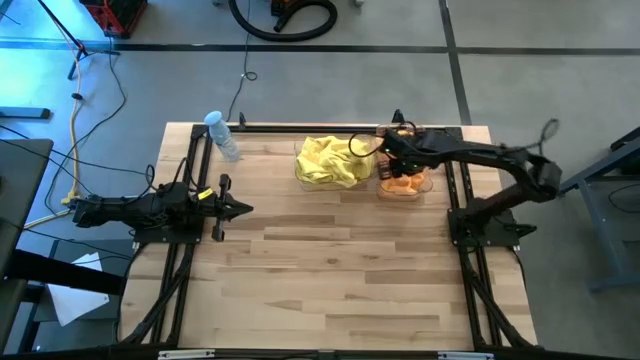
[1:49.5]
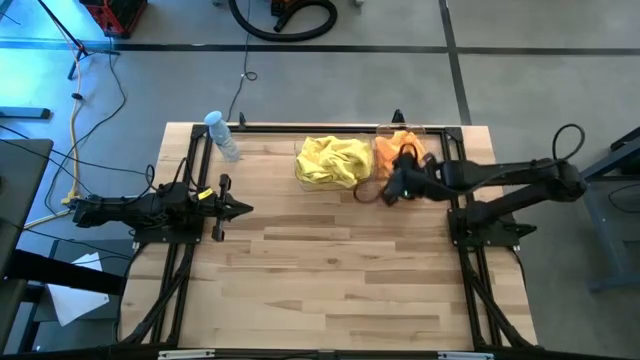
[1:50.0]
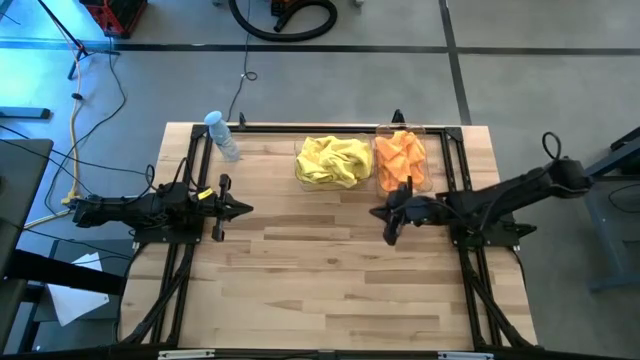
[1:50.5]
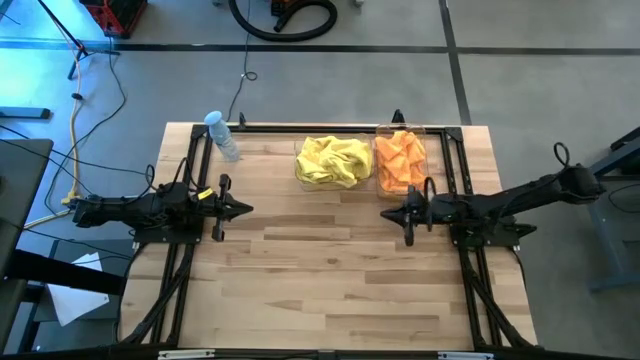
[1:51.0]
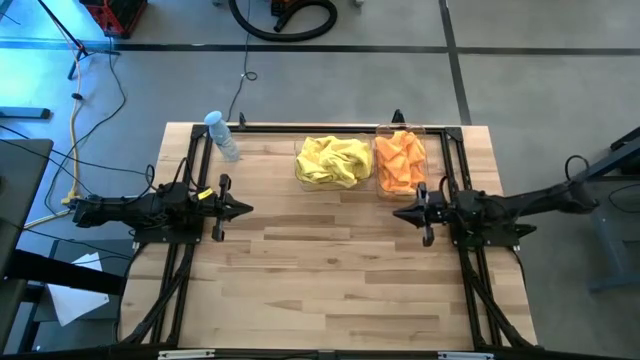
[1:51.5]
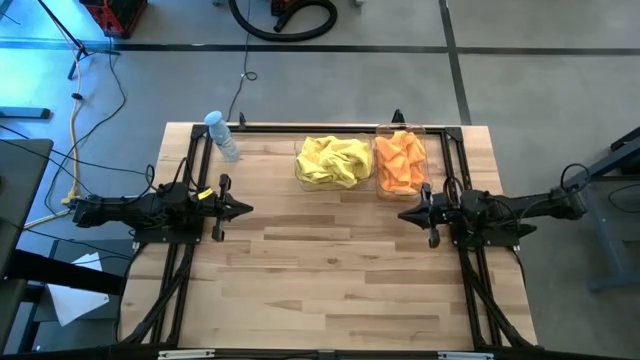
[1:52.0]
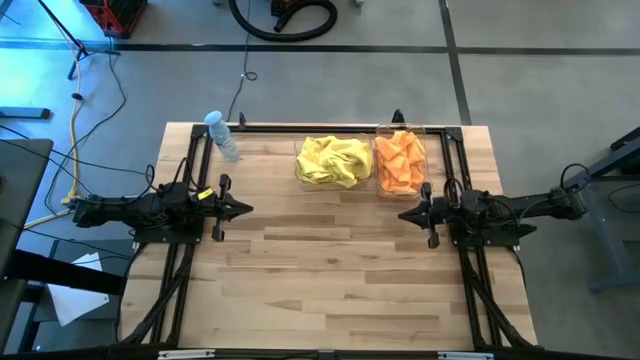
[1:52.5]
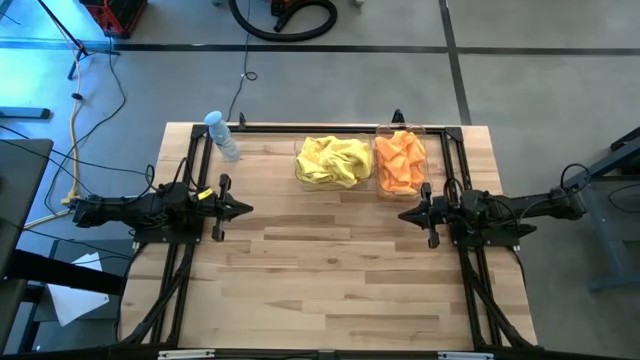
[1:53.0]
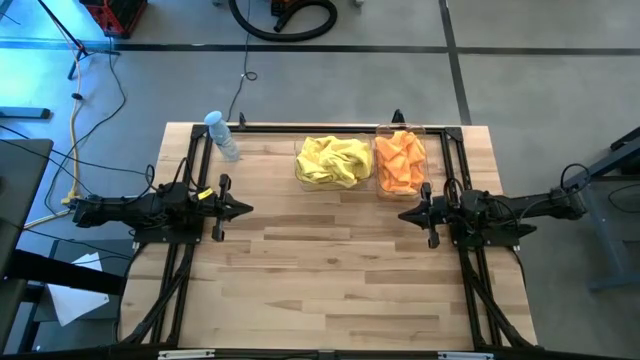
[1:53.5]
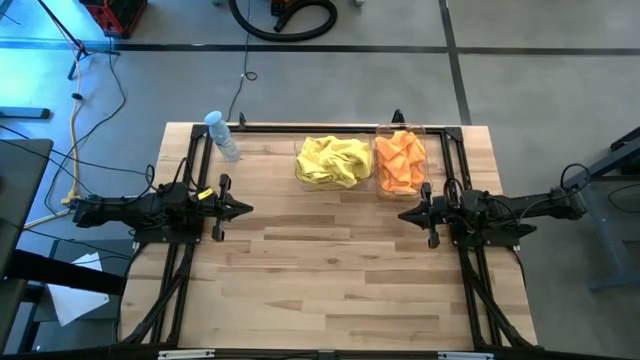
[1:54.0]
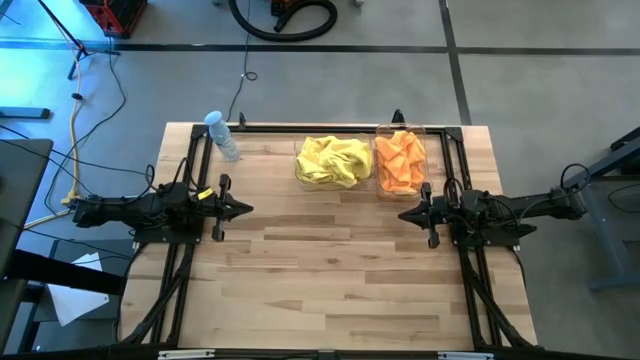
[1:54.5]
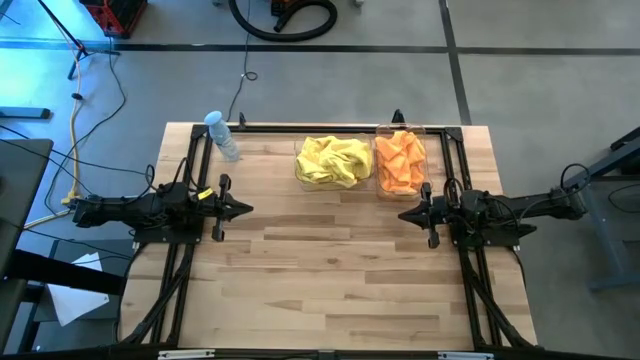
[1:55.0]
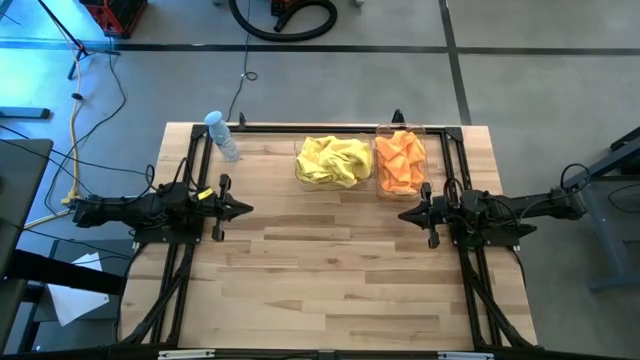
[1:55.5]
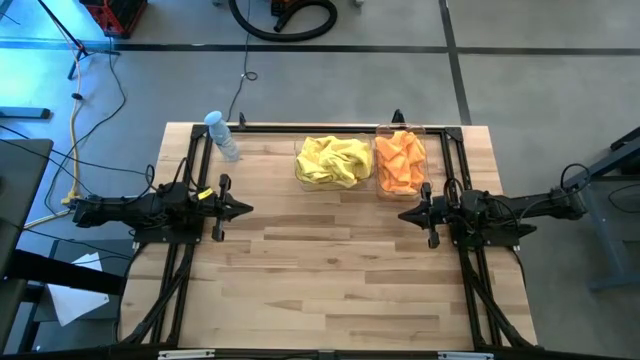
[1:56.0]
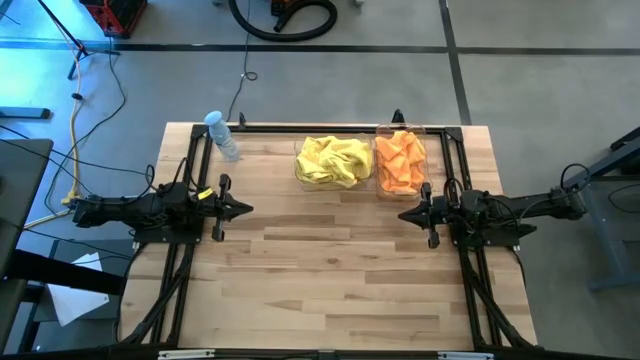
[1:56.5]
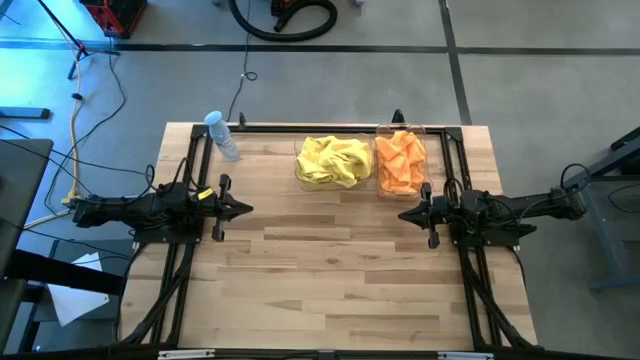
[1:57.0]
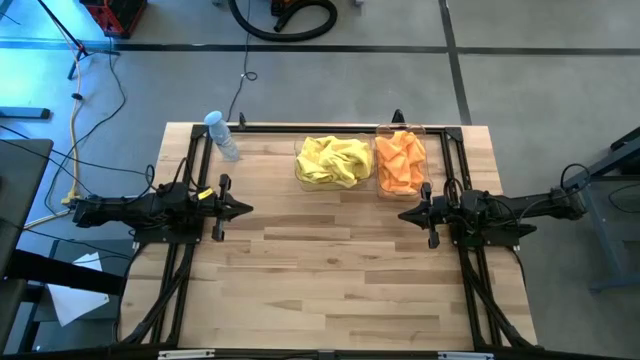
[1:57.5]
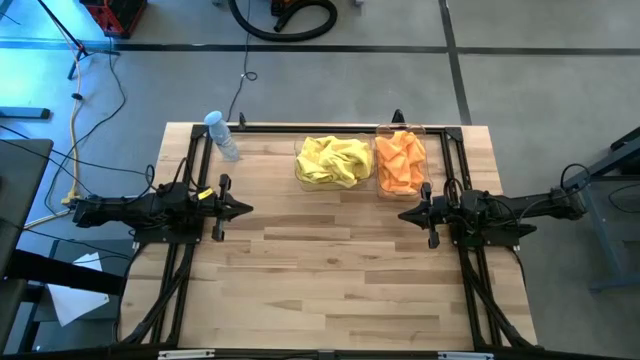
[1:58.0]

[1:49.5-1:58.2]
Task: Sort microfiber towel by color & place in baskets
Return to Home Position
